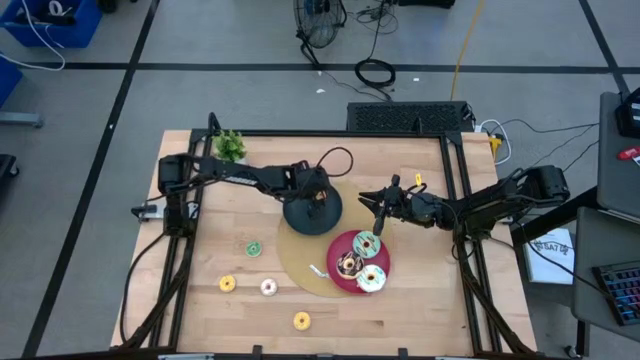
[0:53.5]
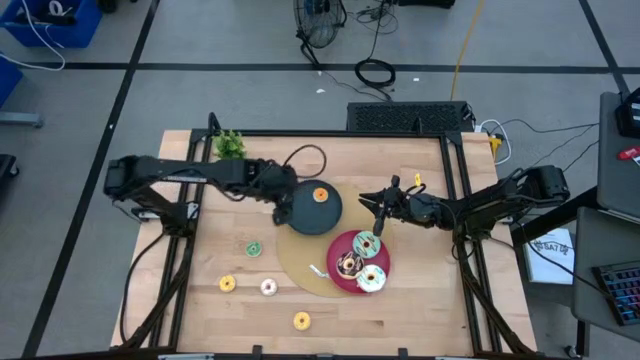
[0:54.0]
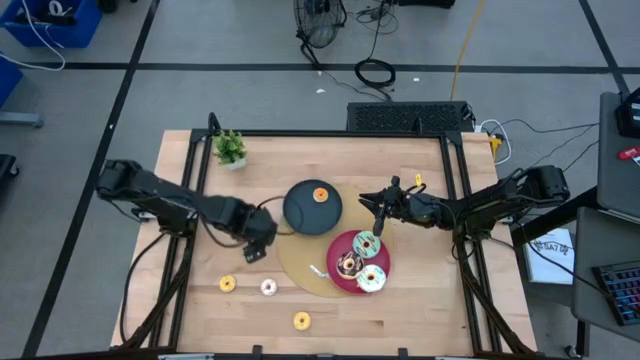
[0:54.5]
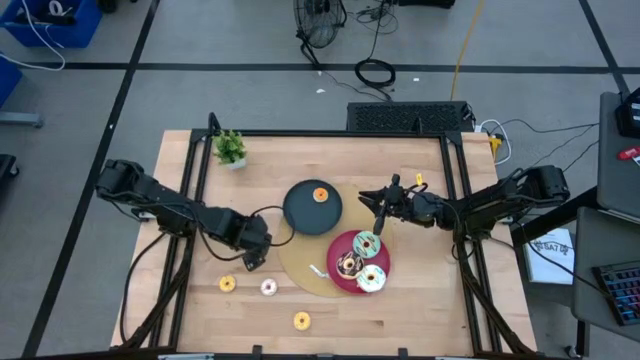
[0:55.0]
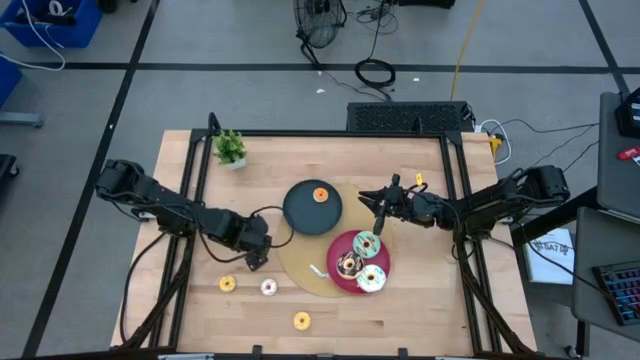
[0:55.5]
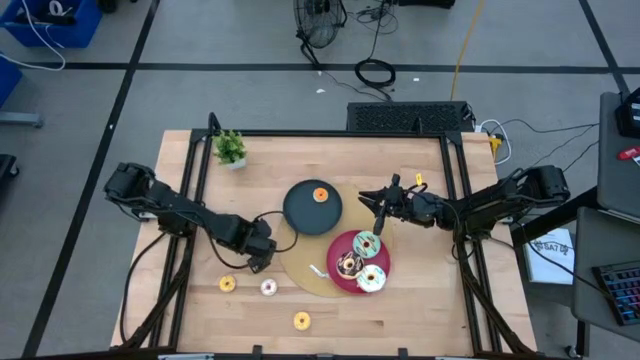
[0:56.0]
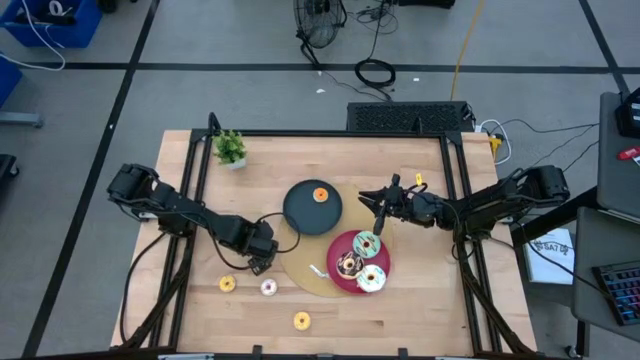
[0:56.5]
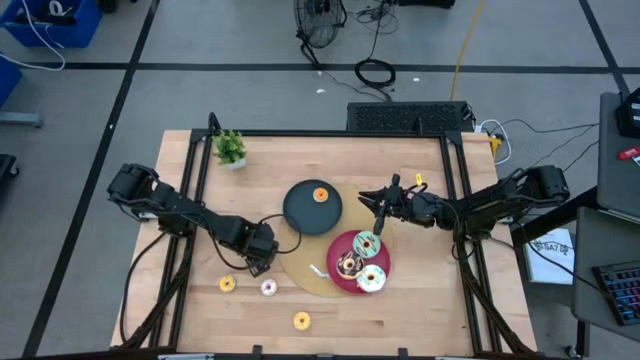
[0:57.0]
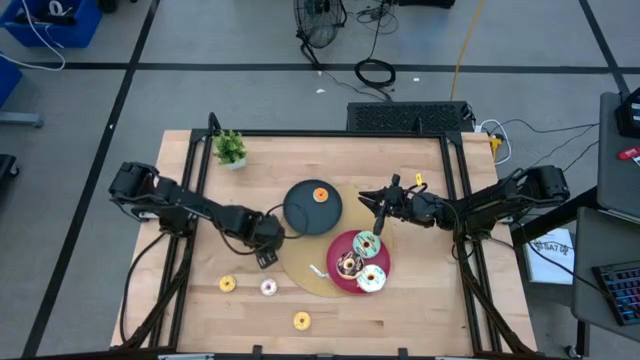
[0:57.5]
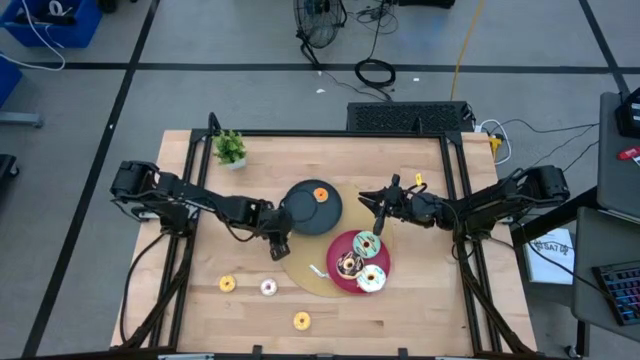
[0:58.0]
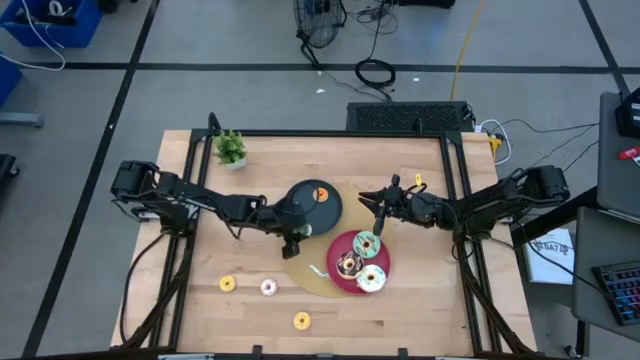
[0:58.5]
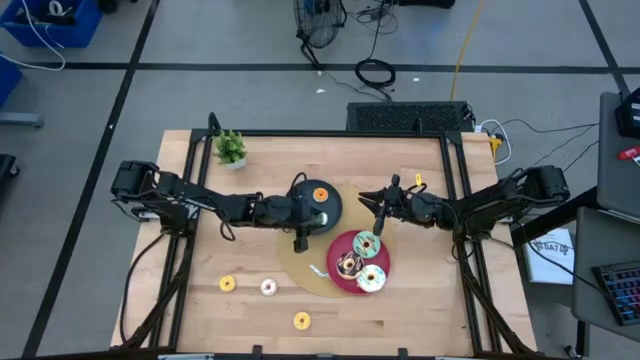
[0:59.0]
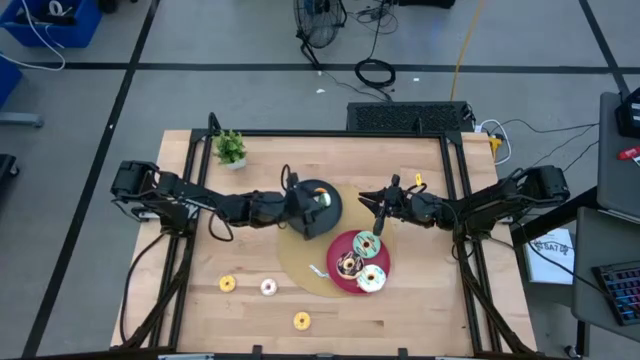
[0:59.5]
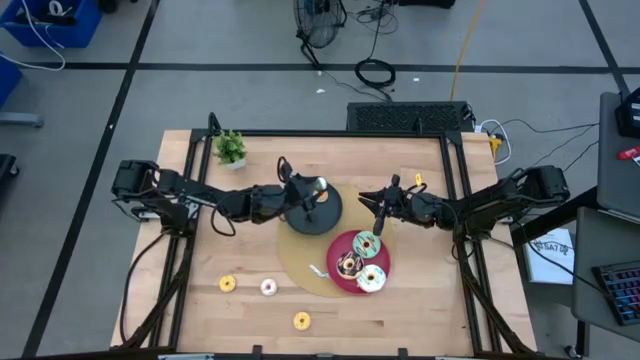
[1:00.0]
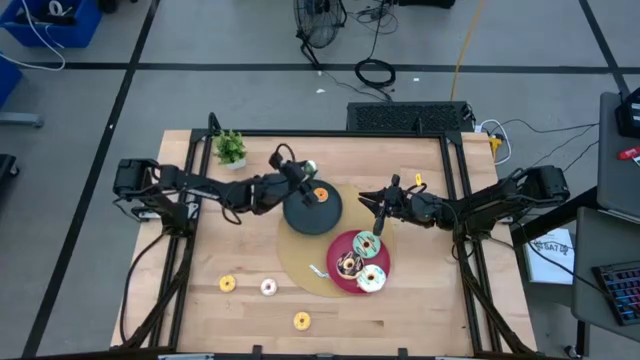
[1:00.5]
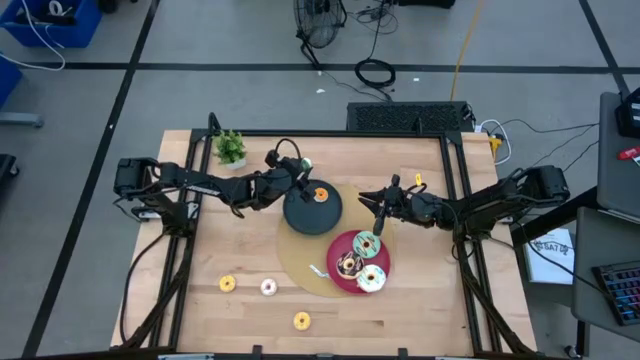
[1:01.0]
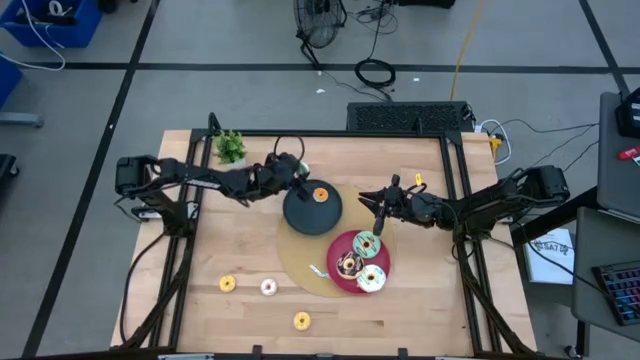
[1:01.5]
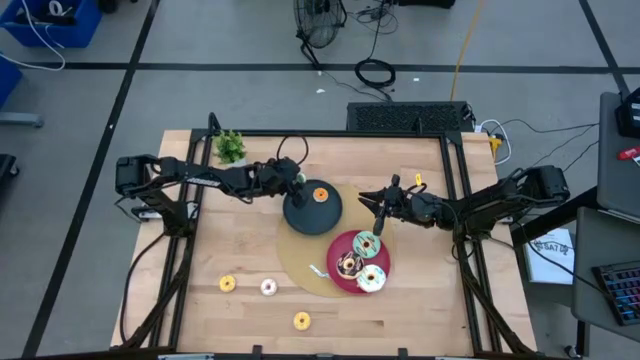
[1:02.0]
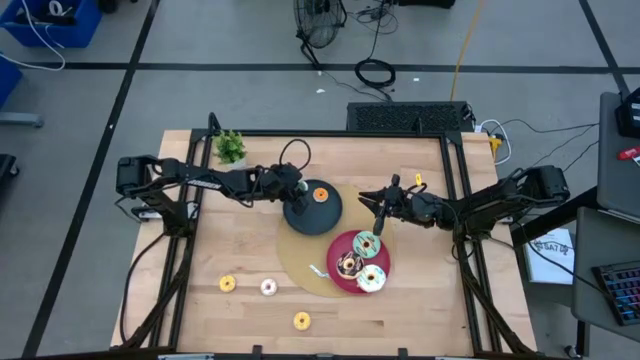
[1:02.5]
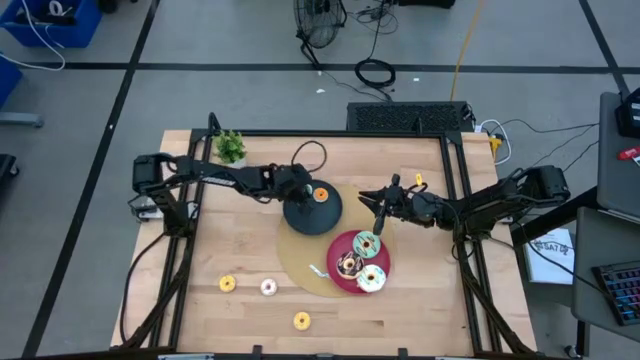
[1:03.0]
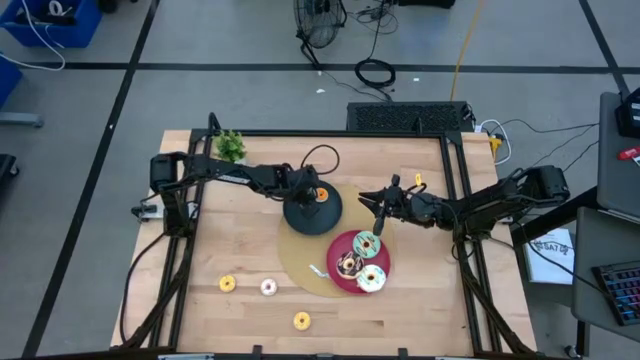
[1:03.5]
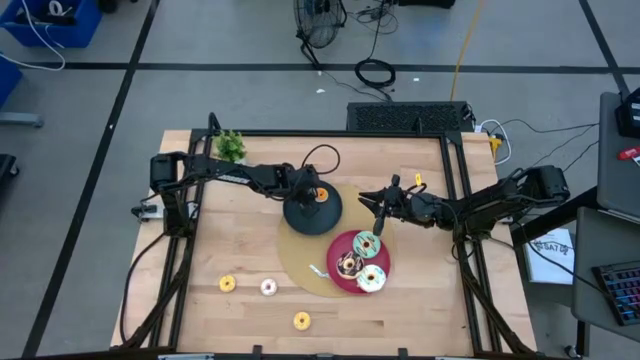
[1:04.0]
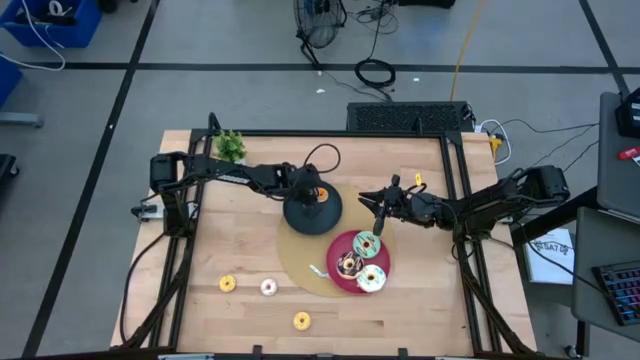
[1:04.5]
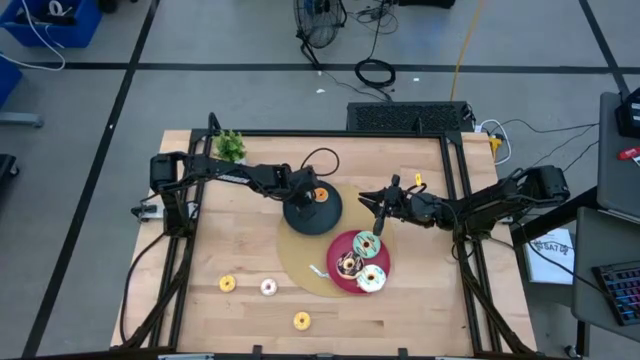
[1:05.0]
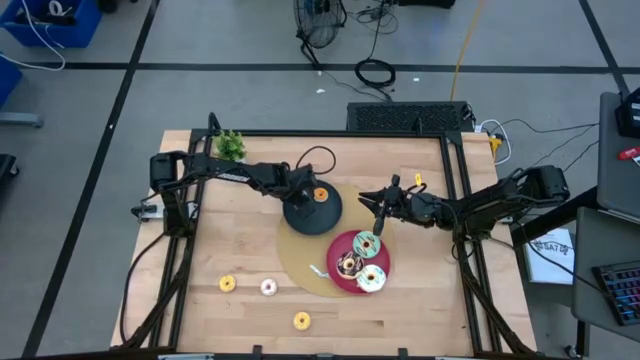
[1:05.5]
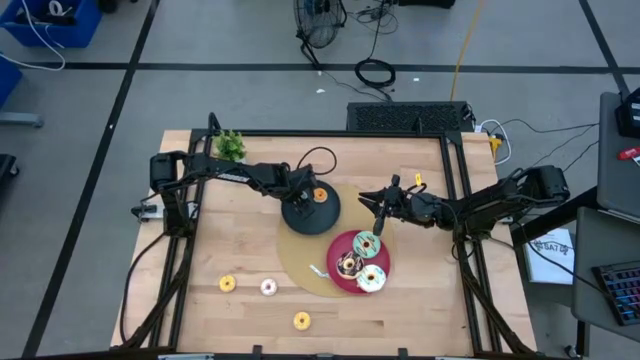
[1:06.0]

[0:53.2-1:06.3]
Task: Pick & Place donuts
Put the small green doughnut on the blue plate

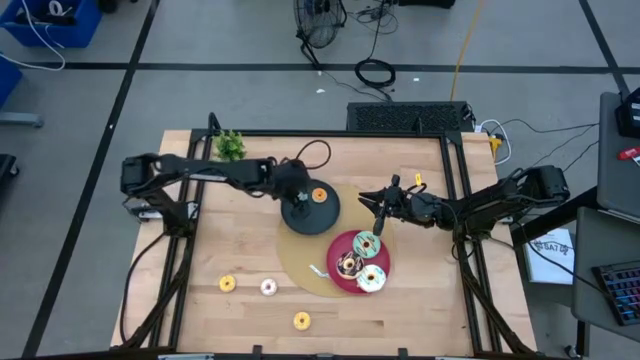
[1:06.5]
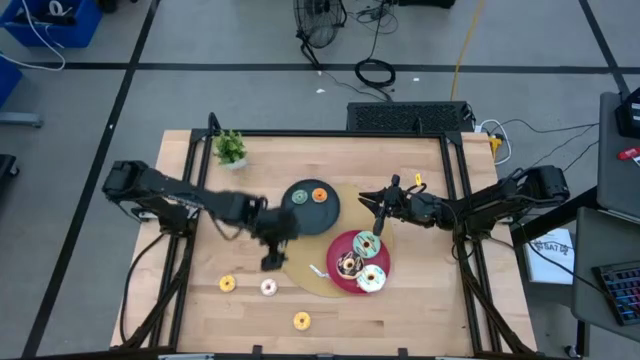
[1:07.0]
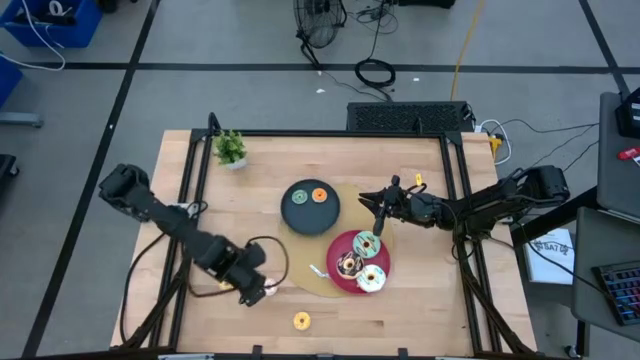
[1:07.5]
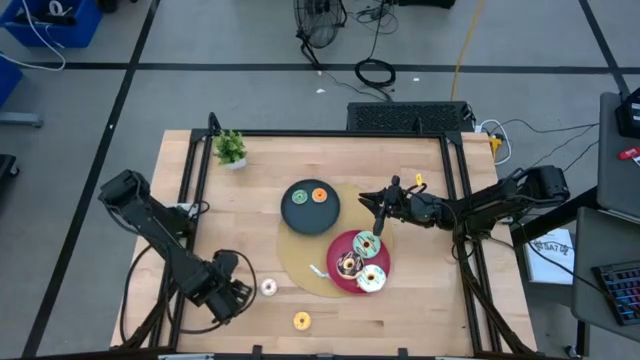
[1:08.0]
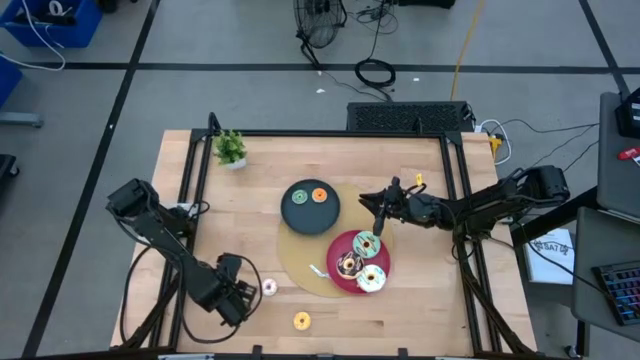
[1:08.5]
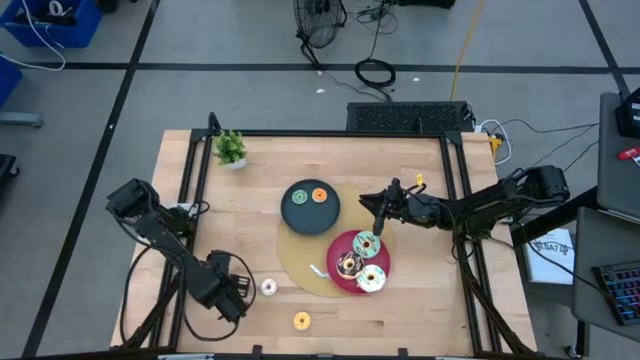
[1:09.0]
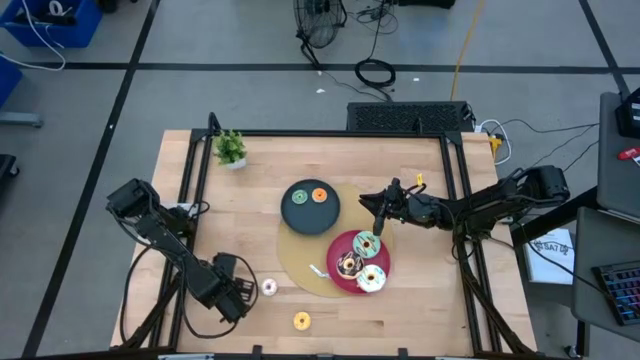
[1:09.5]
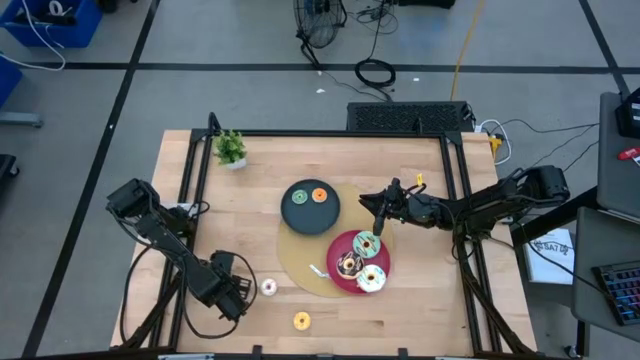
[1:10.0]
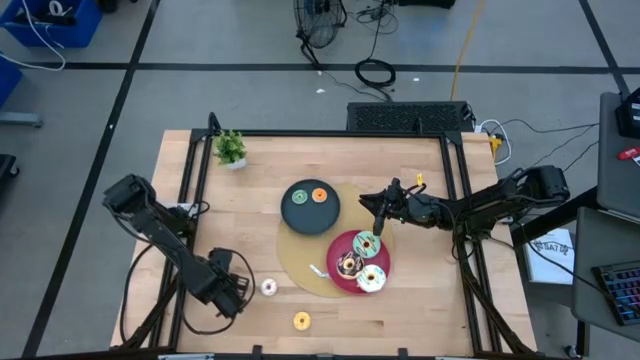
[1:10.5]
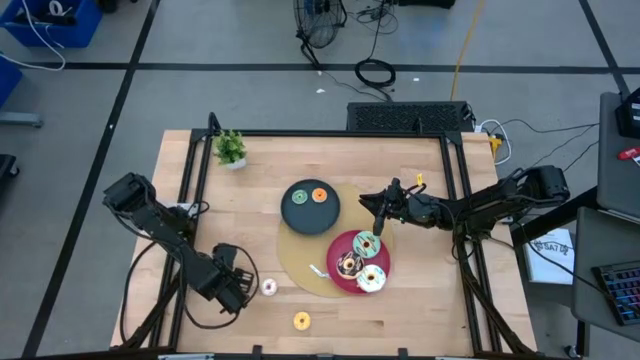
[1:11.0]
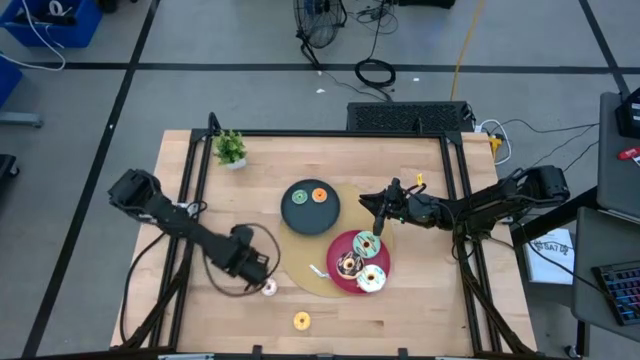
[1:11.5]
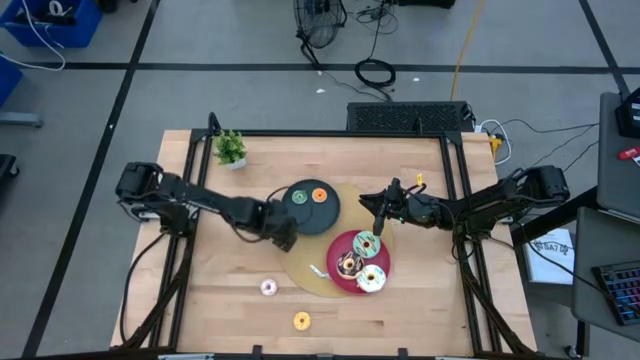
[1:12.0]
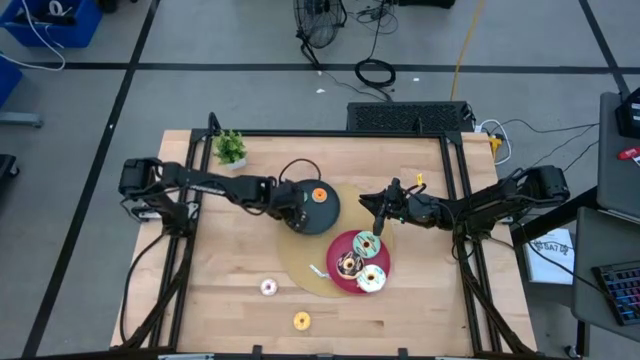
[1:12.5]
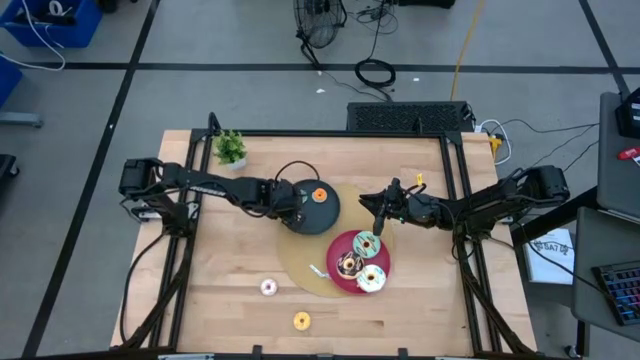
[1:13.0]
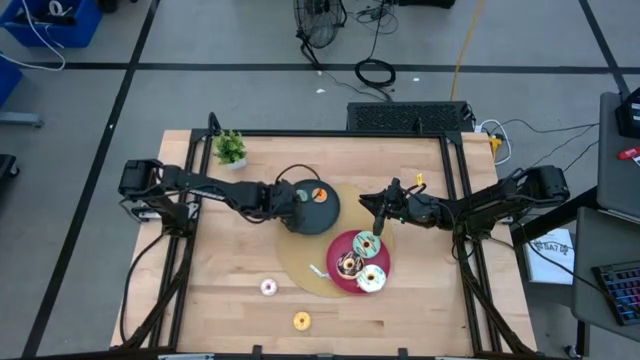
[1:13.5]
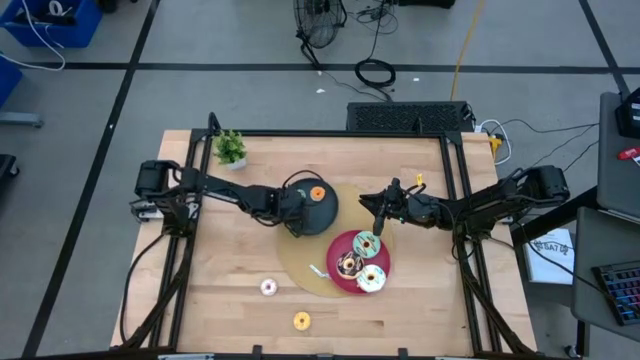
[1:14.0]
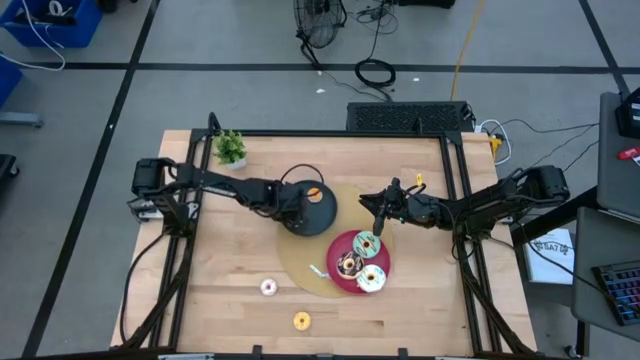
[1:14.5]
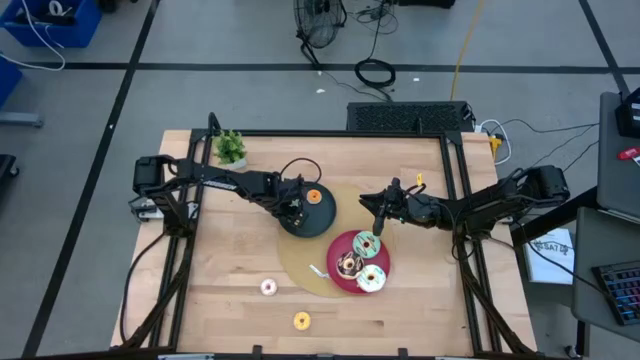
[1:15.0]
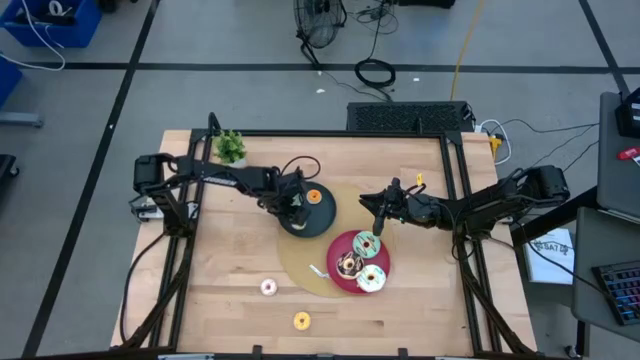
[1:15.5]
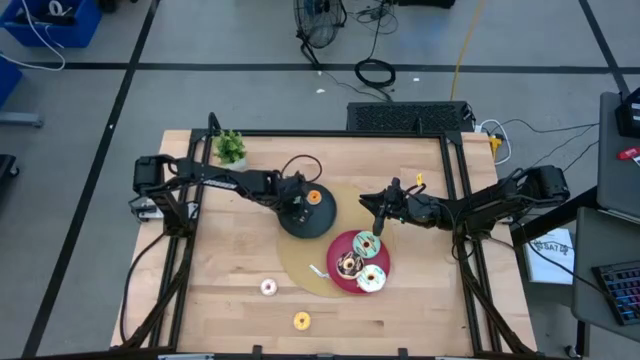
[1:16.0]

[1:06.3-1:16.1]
Put the left small yellow doughnut on the blue plate
